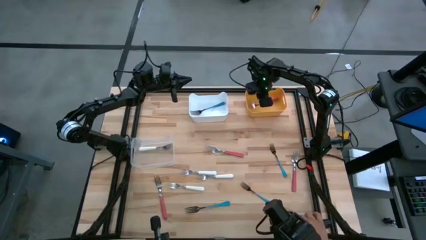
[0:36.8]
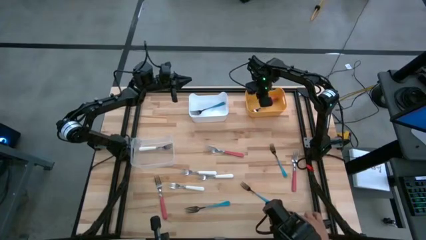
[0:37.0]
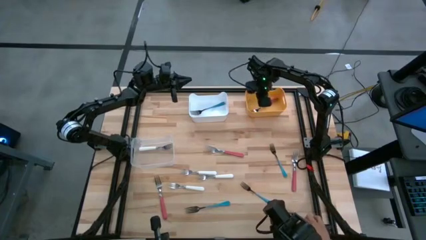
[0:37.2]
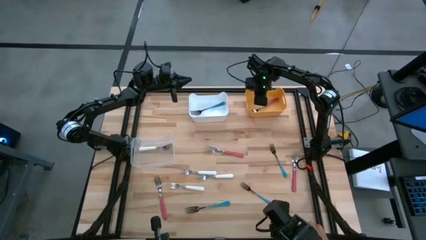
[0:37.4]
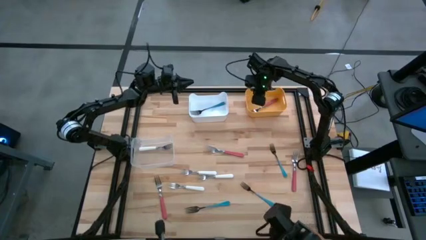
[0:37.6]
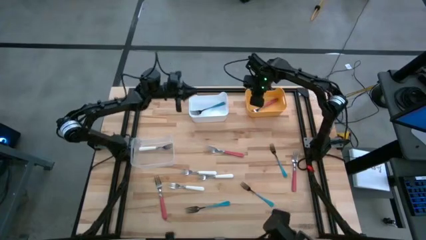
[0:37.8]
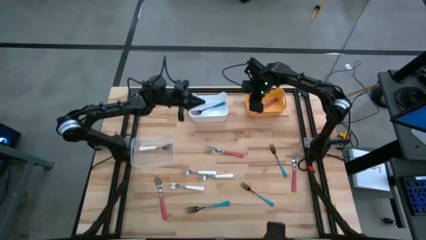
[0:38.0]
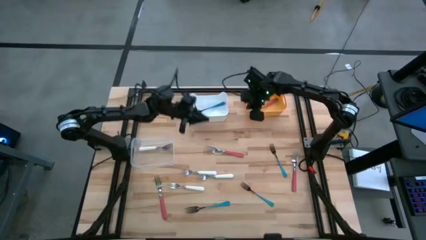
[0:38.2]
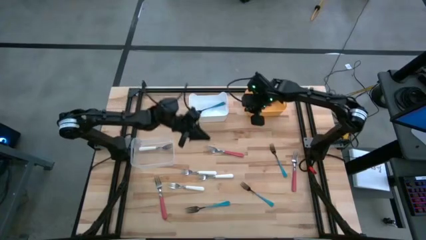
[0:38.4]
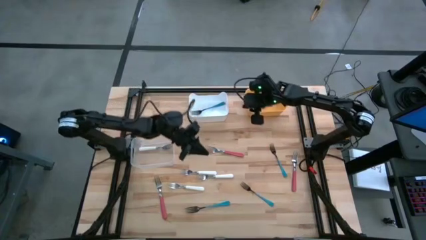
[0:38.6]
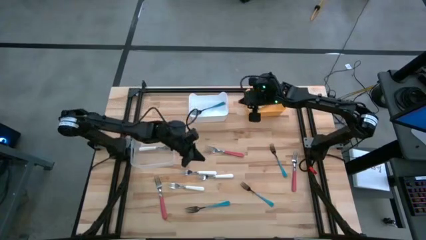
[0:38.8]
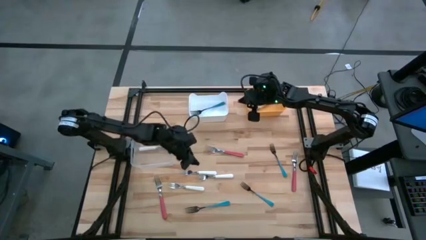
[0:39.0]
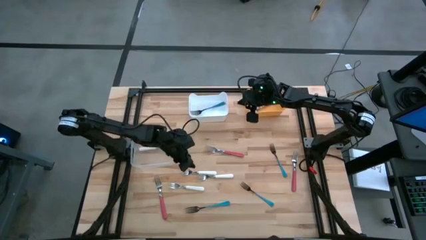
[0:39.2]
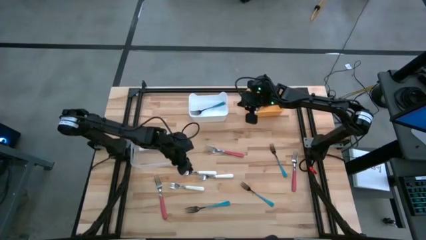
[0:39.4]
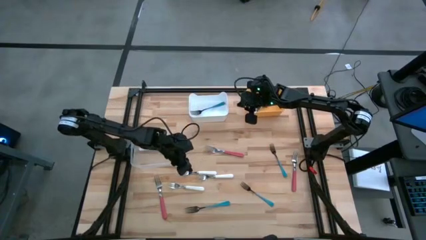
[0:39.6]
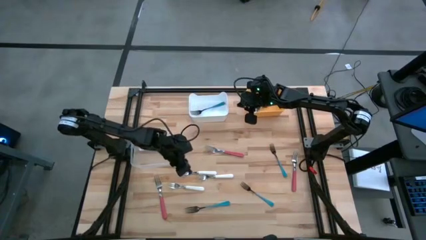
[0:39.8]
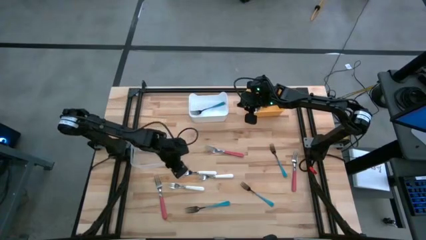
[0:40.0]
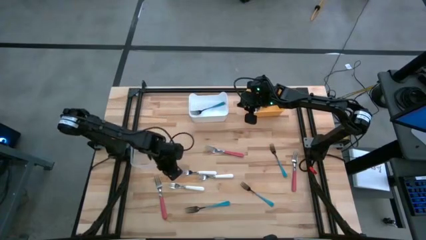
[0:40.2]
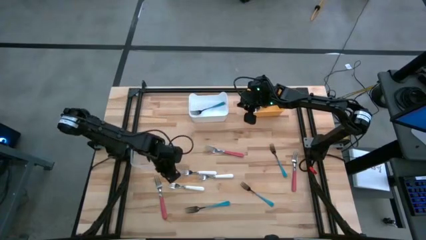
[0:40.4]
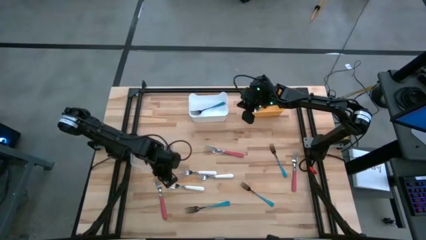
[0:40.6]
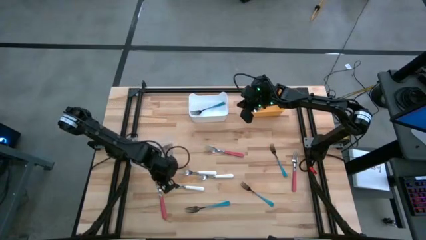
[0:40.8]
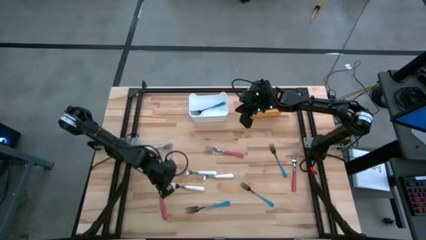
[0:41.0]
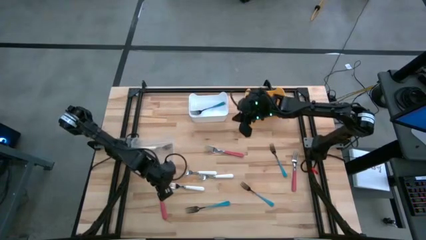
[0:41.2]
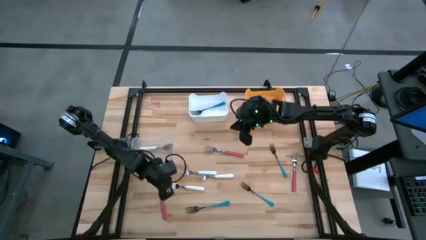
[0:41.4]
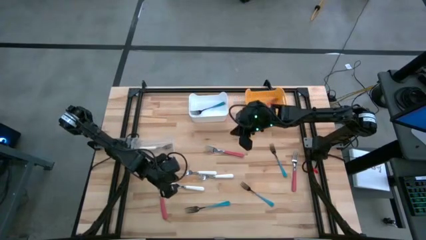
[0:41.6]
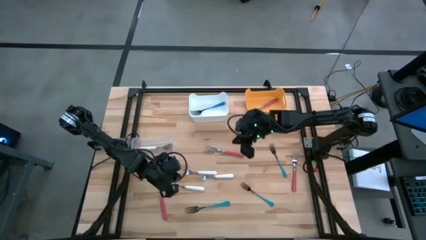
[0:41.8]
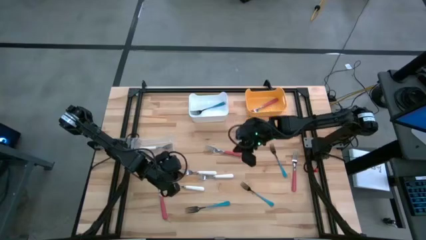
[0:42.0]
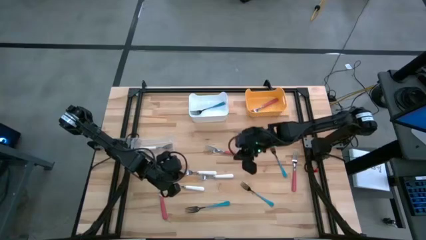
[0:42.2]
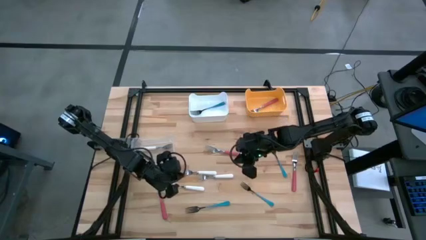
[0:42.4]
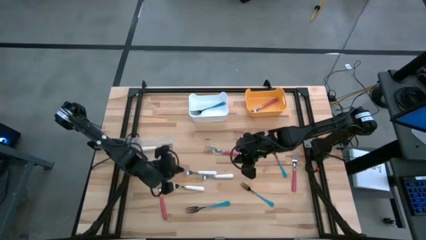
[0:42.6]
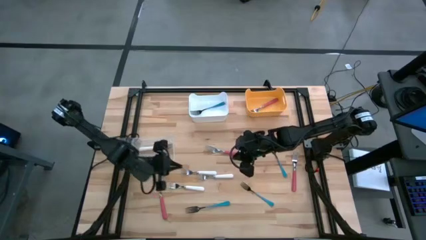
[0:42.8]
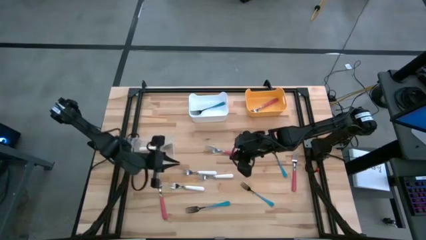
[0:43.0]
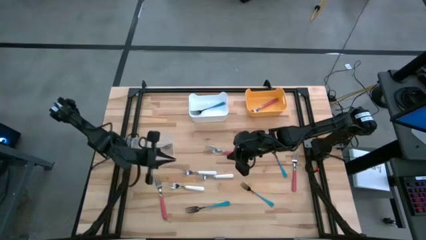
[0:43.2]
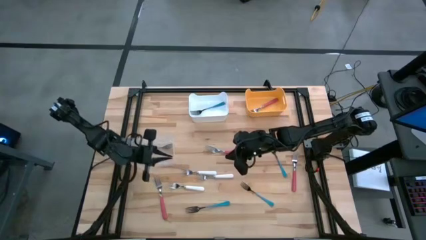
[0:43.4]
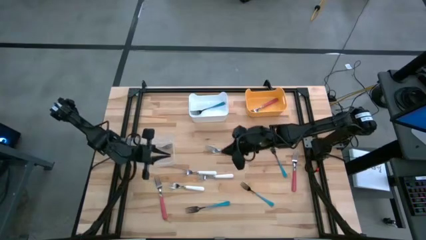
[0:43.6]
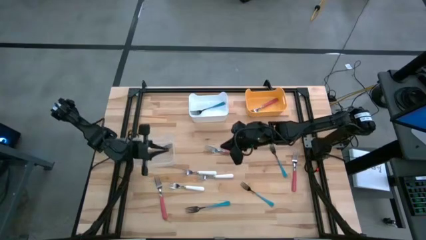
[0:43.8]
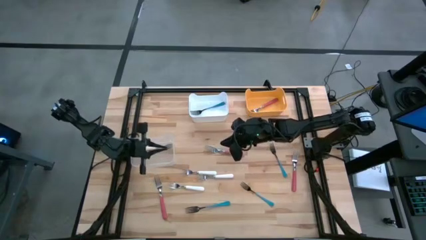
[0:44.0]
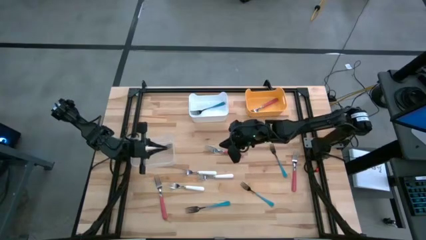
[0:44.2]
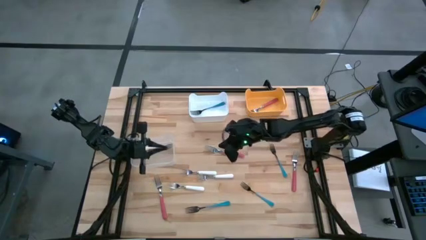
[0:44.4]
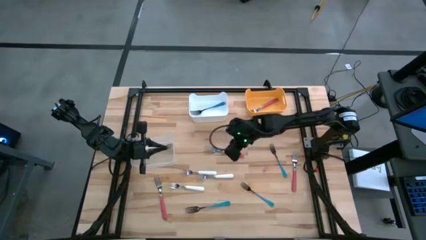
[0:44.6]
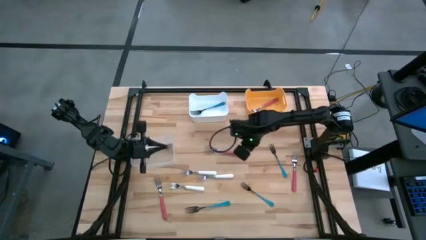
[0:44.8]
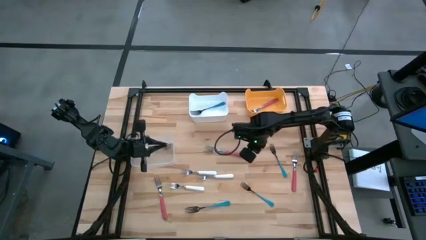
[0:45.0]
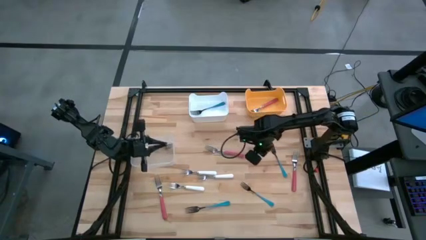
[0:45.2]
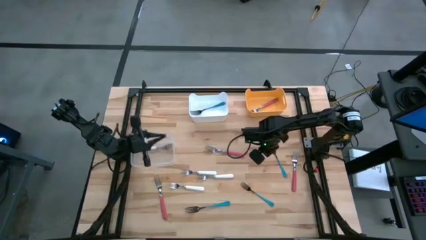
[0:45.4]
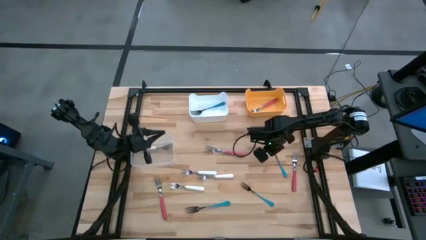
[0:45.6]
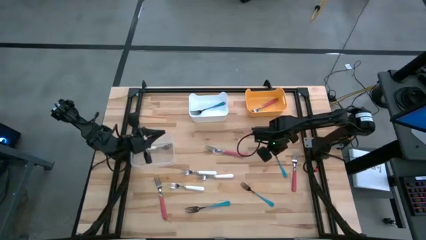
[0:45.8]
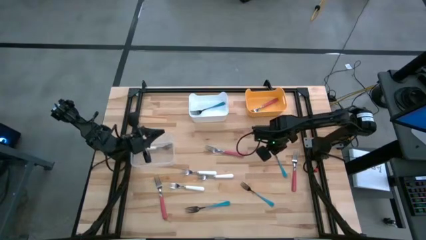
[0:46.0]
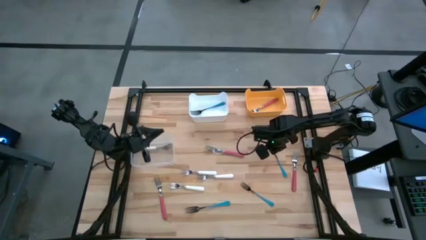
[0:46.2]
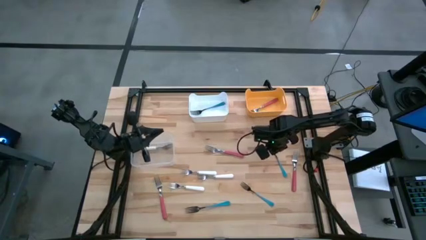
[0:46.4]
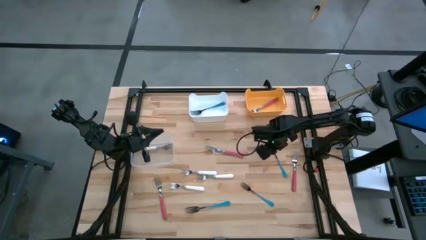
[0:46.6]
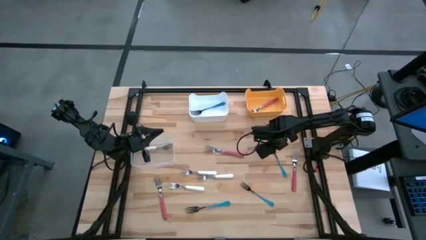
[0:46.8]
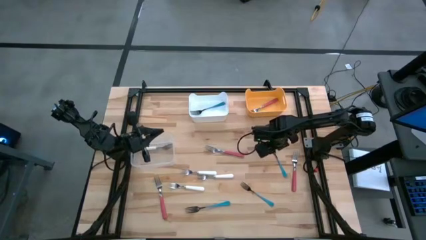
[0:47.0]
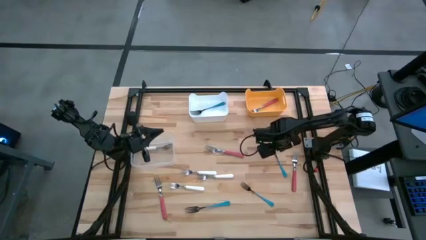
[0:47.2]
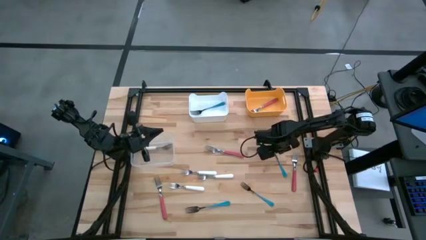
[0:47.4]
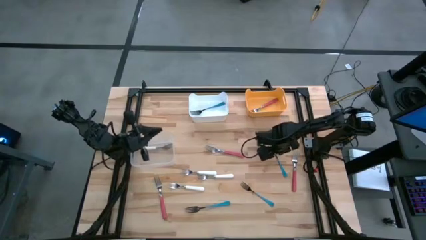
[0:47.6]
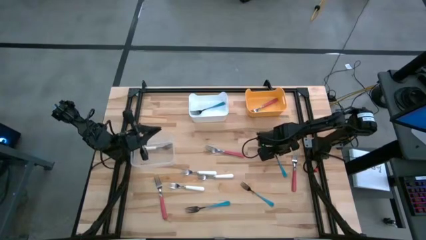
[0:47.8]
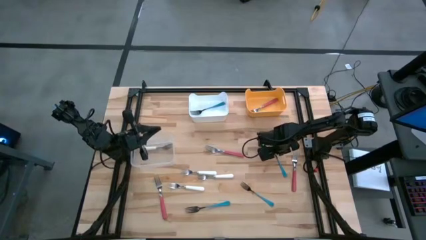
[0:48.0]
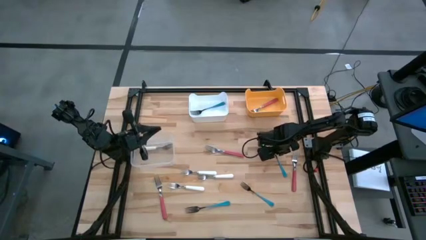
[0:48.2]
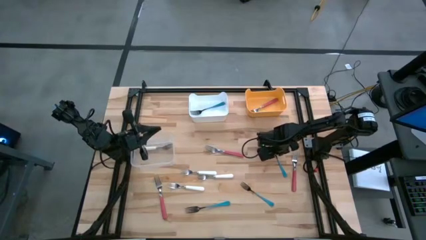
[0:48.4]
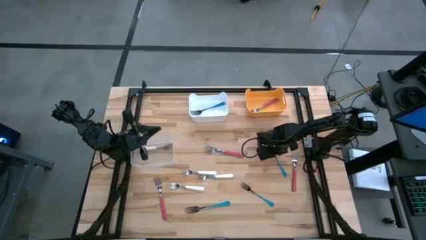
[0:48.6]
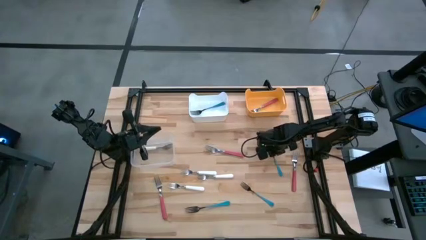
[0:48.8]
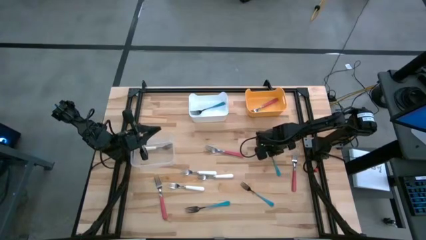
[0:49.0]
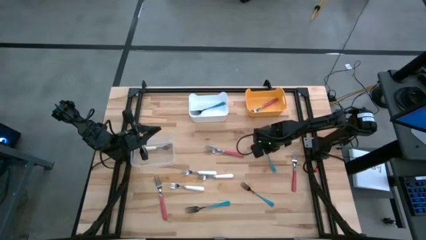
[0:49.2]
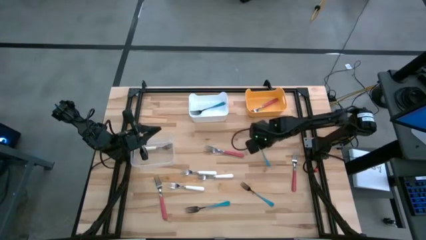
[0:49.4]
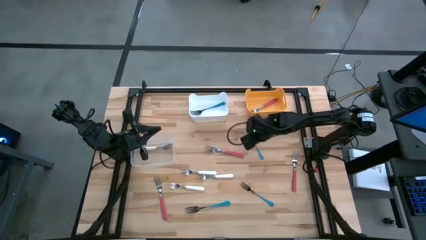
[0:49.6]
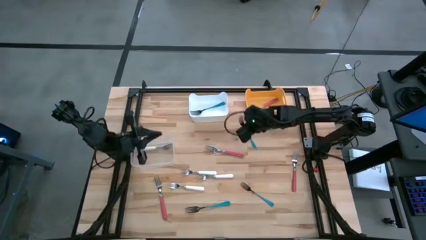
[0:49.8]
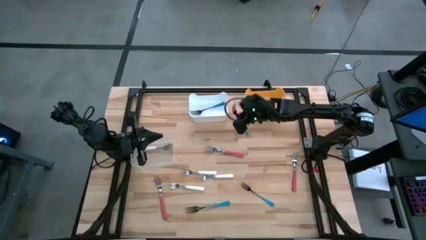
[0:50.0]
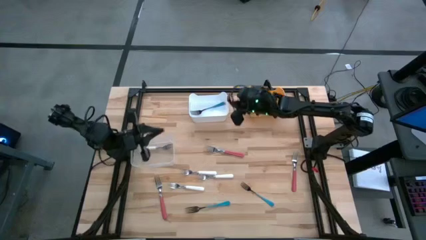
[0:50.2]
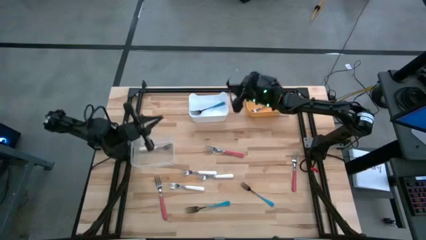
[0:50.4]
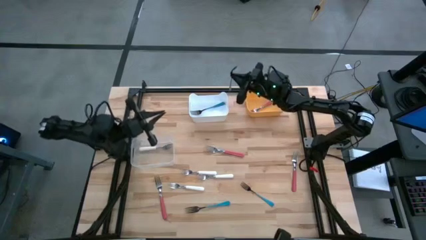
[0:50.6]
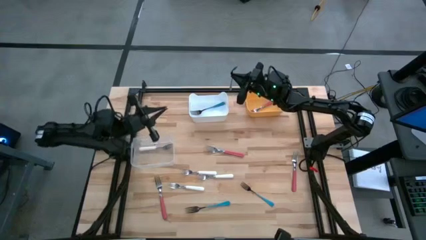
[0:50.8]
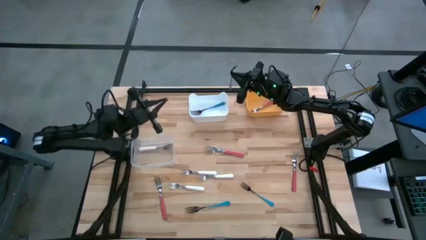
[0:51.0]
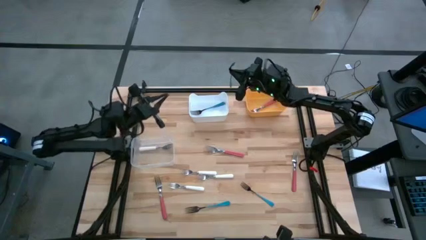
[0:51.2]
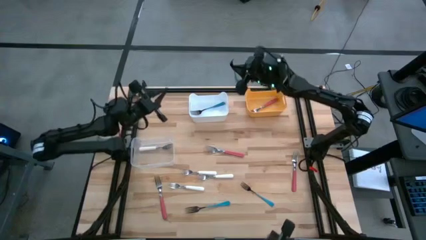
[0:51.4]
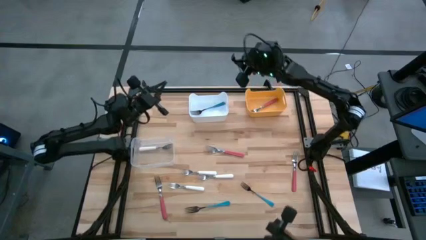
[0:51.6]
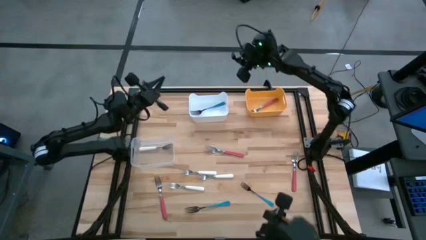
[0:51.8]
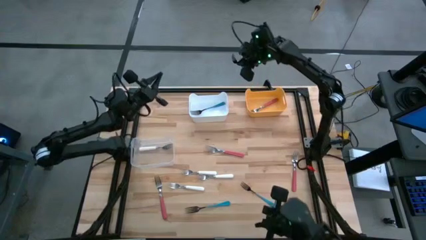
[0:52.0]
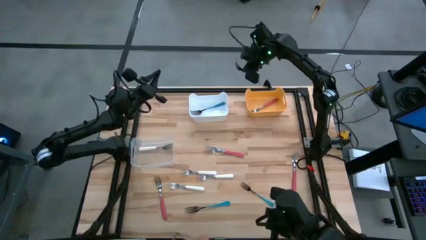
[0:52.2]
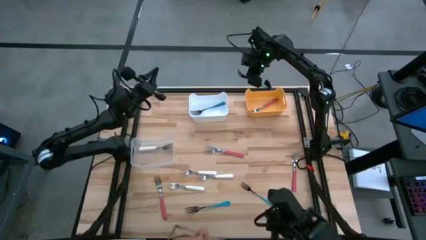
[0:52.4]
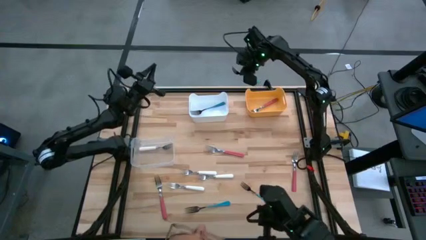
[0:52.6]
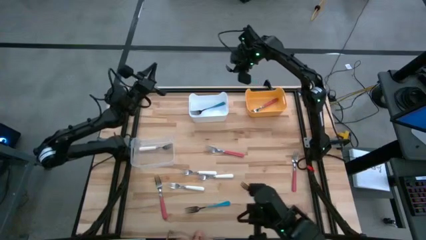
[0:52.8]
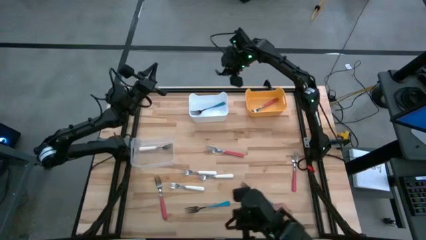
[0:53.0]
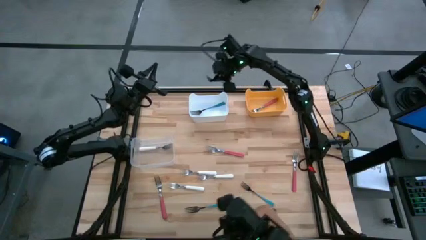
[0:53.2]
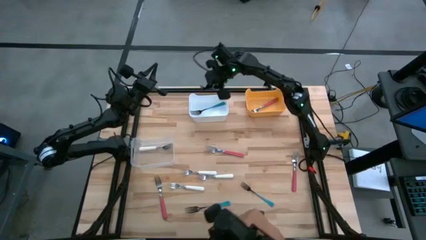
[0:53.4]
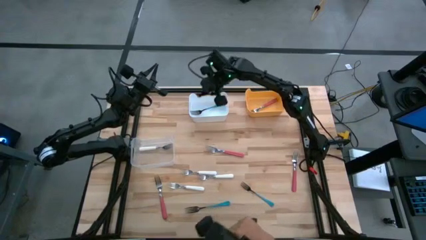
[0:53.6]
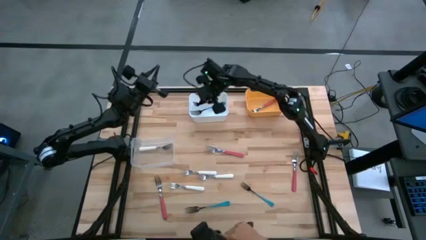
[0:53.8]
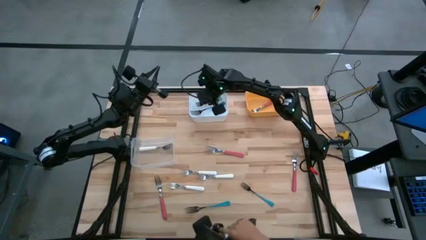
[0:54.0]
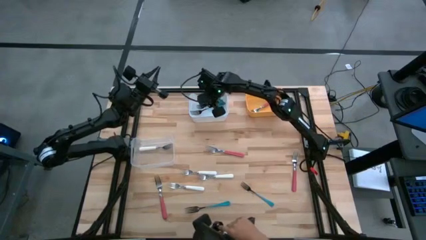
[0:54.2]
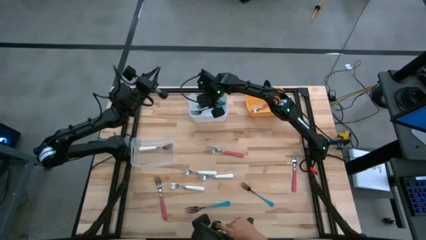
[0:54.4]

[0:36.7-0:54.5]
Task: Sort silverware by color (type)
Put the top blue fork into the white bin
